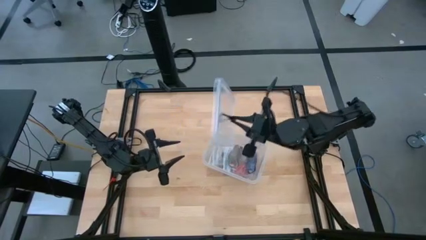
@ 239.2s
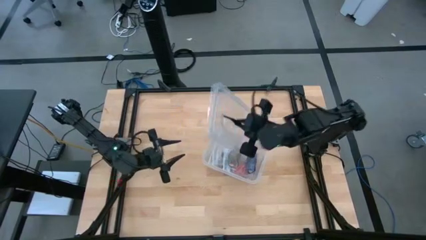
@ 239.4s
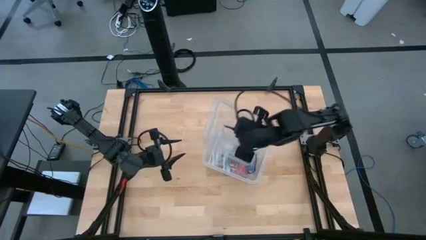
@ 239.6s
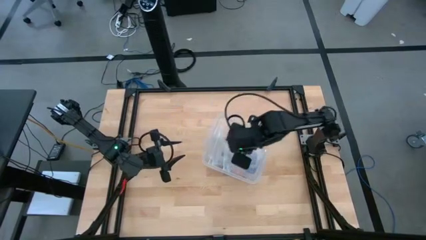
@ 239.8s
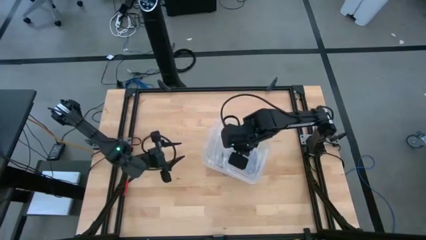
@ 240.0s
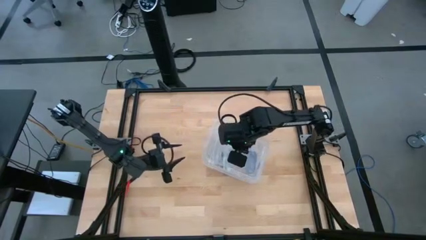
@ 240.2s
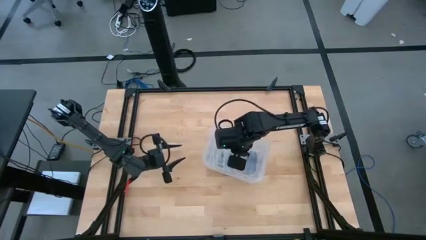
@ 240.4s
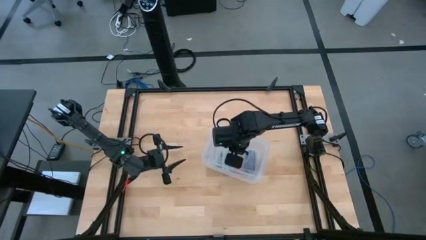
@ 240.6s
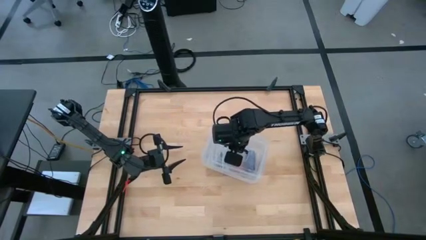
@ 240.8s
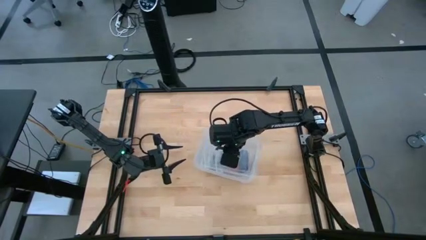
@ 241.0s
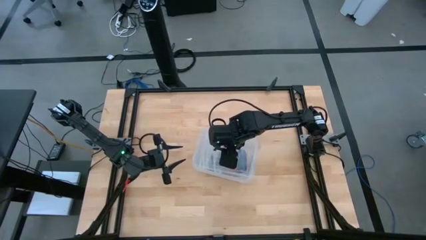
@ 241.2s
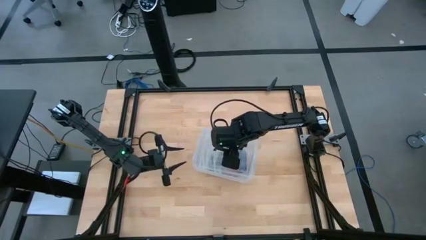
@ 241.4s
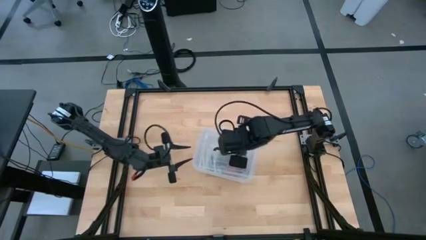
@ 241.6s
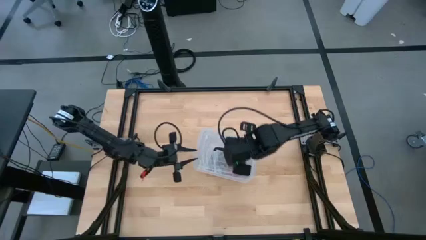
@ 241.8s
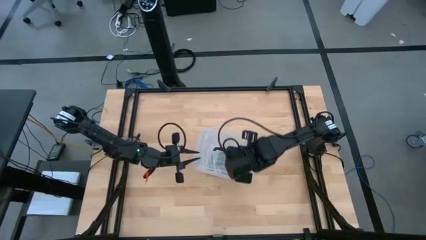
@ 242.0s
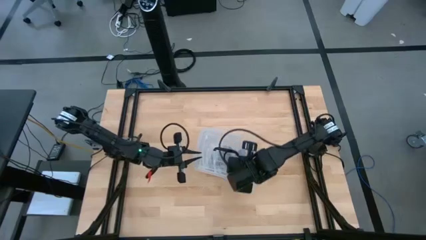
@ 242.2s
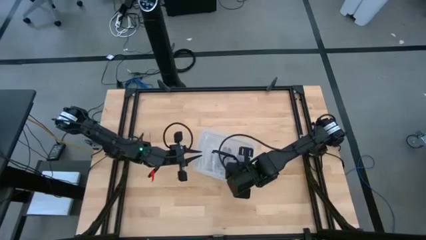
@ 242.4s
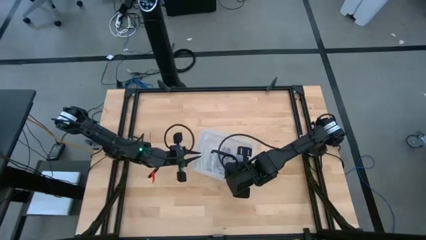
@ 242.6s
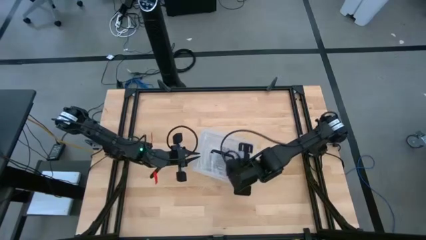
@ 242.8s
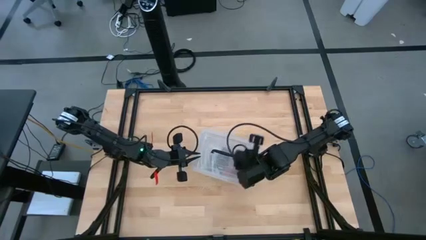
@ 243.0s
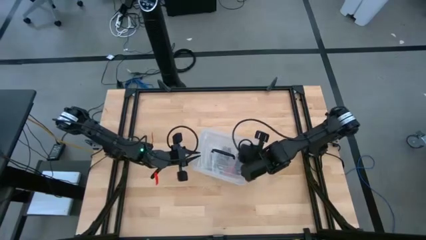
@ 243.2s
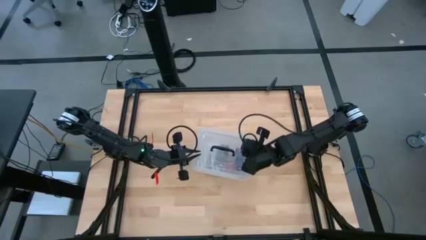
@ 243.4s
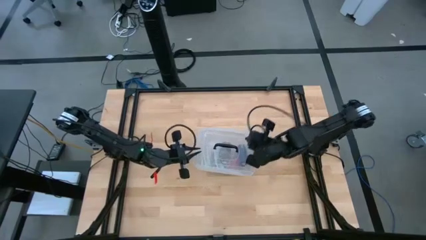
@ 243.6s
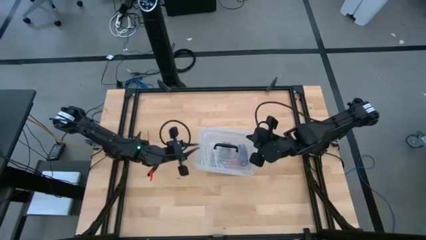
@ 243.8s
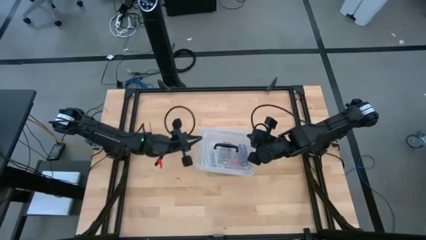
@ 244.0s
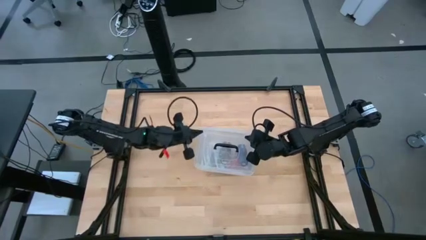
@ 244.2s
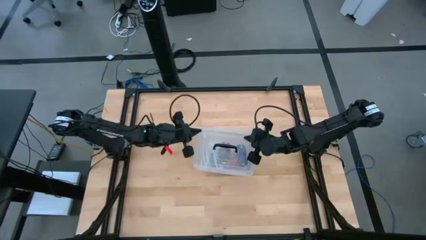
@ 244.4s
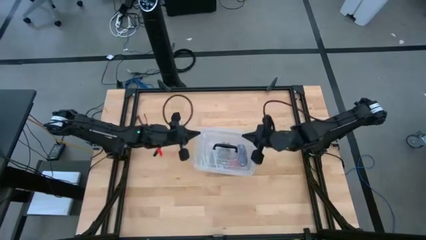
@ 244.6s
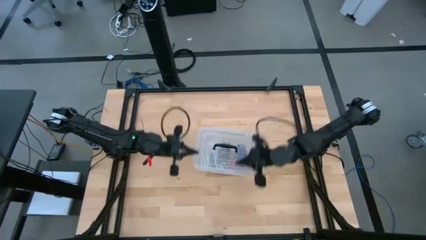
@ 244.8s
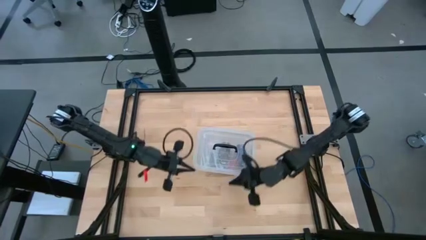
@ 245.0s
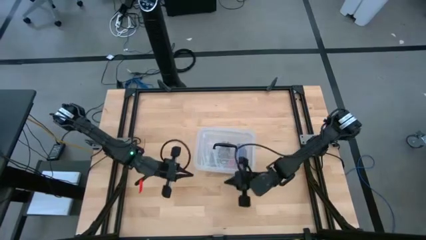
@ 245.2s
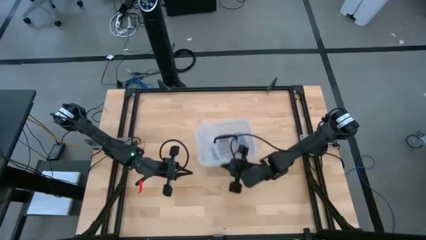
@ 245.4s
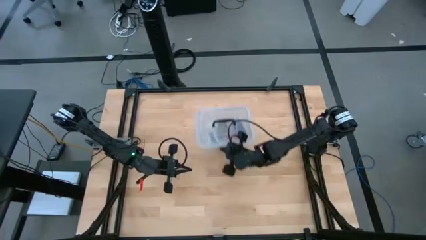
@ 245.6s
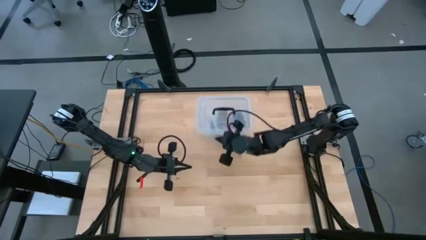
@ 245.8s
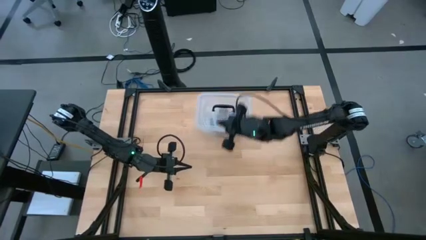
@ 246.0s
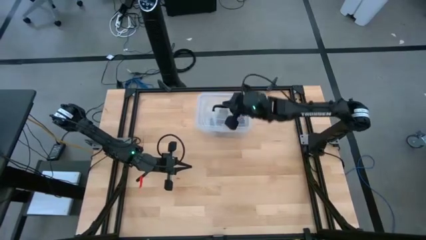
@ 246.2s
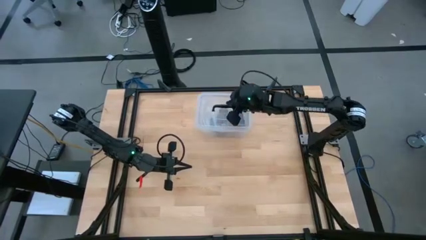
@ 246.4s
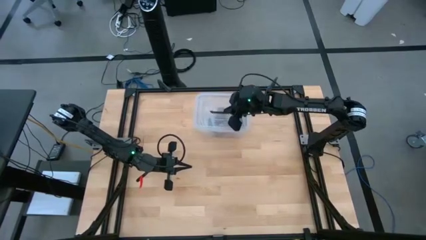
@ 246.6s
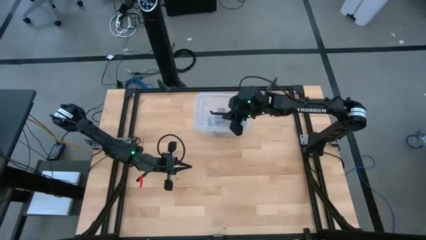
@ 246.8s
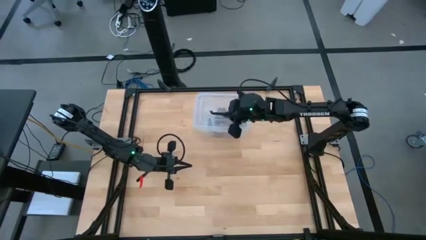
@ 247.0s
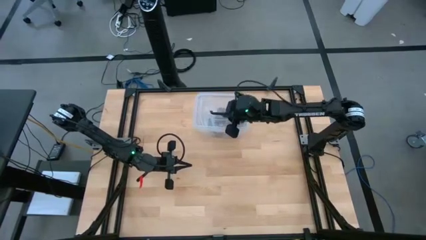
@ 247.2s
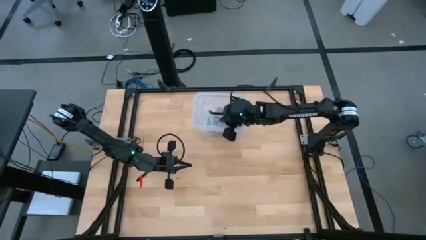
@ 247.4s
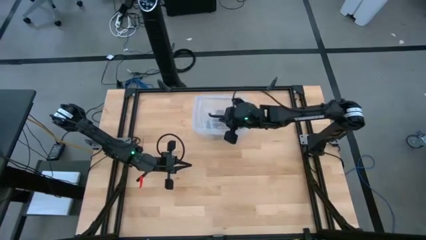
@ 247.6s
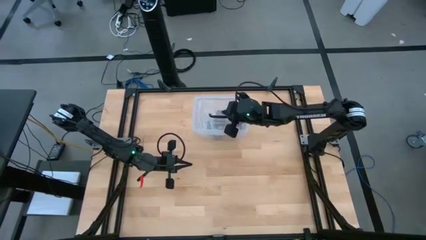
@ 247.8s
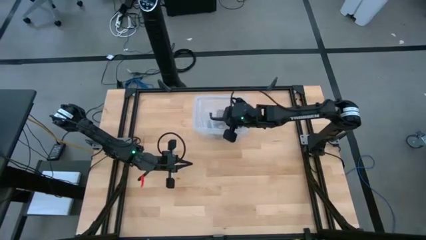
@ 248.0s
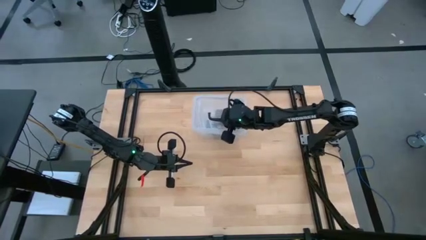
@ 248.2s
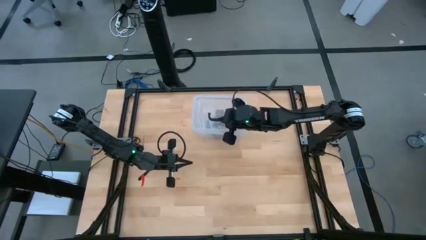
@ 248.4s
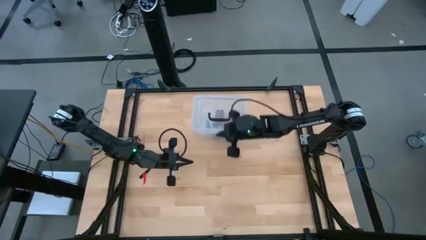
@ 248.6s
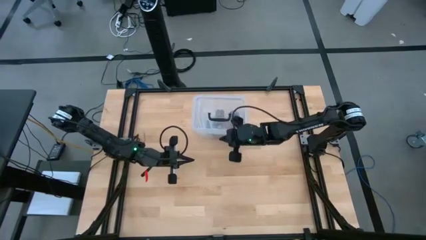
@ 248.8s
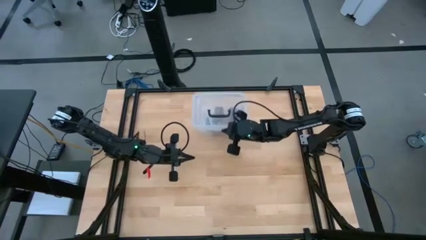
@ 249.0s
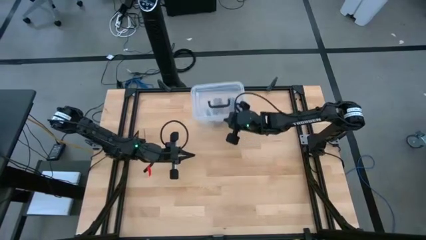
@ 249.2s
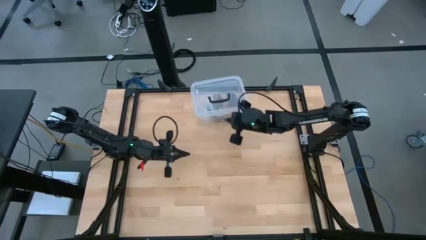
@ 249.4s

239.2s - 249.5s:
Task: Roll bandage
Close the transparent bin with the transparent bin lid

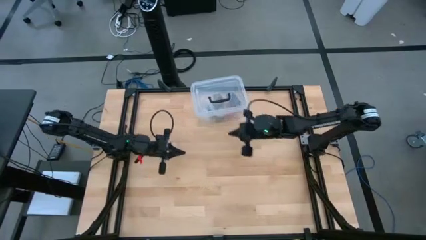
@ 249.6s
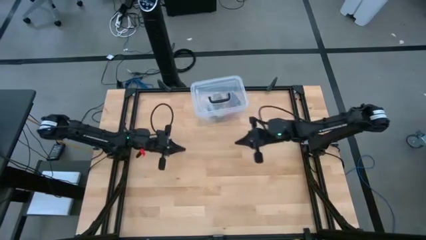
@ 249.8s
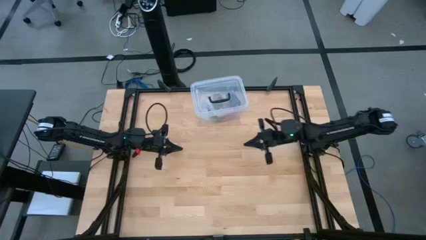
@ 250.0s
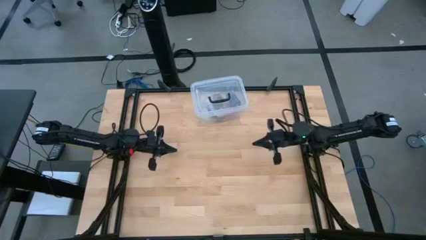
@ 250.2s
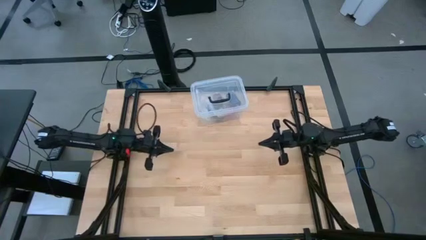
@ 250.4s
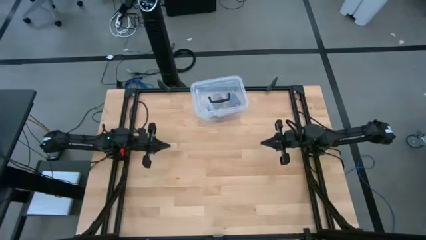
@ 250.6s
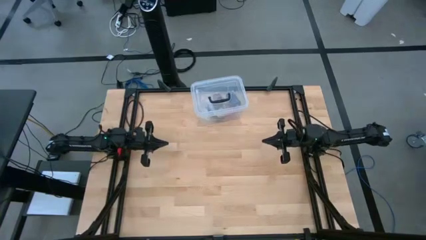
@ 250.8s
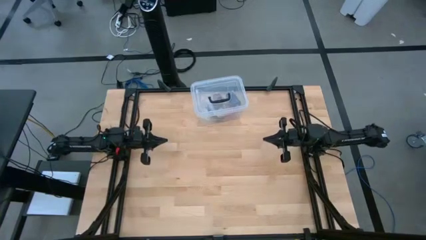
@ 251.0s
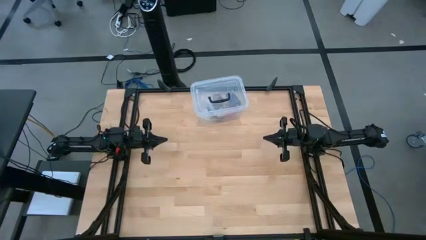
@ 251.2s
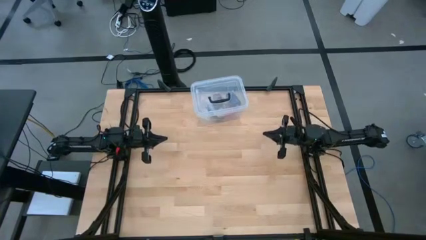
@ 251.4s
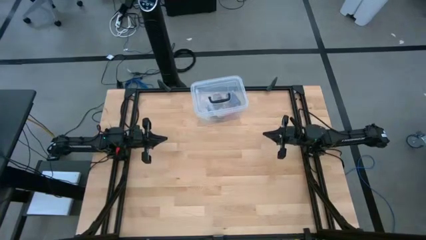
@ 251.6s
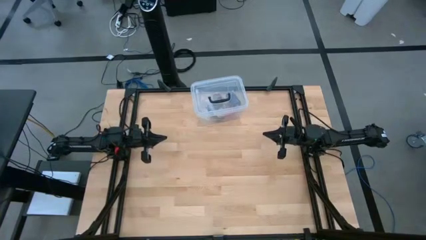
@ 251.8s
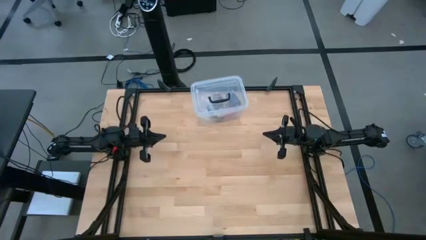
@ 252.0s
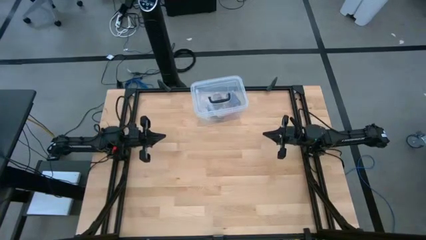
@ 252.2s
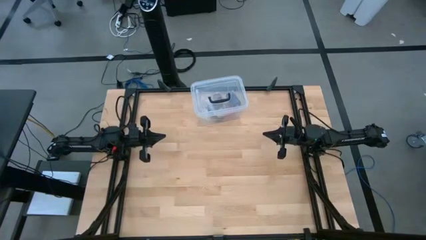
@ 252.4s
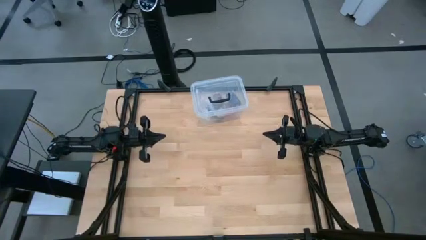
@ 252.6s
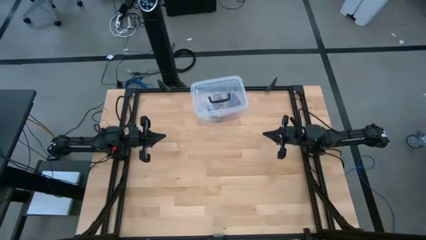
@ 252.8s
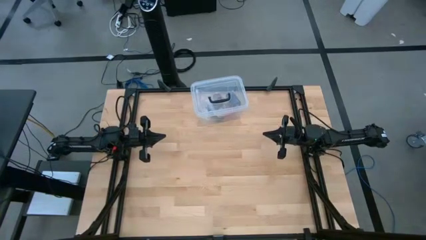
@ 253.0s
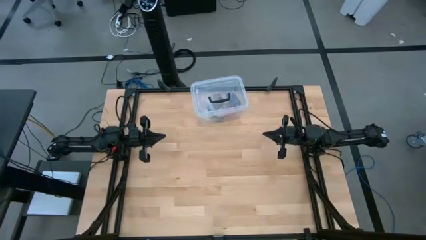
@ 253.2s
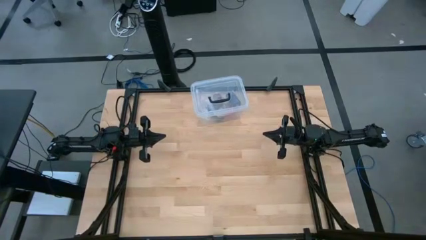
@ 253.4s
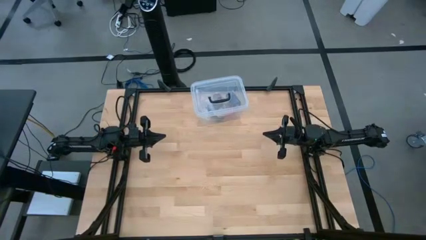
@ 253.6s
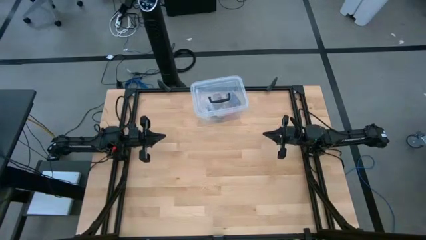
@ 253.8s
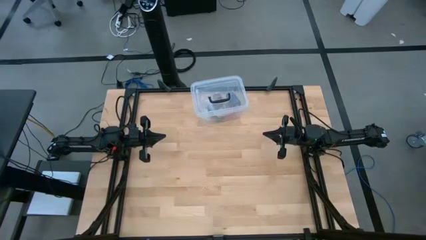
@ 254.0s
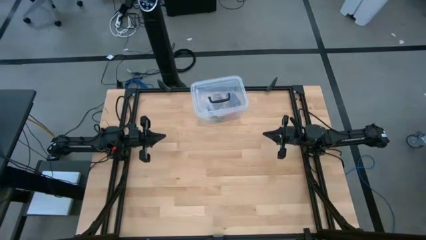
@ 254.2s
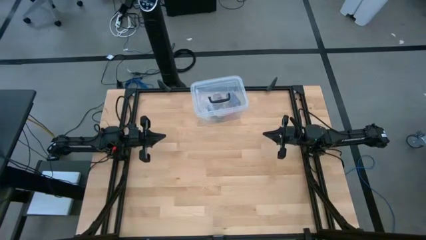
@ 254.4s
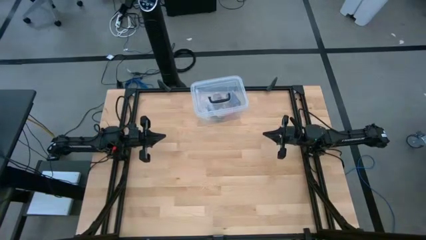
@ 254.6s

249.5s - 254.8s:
Return to Home Position

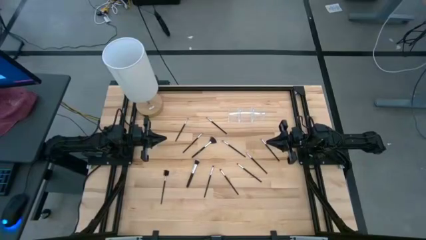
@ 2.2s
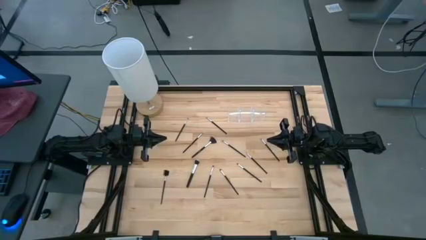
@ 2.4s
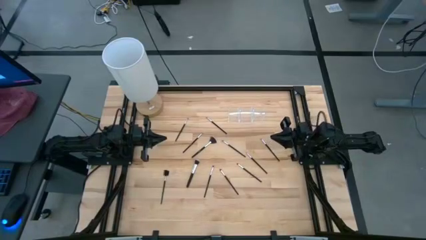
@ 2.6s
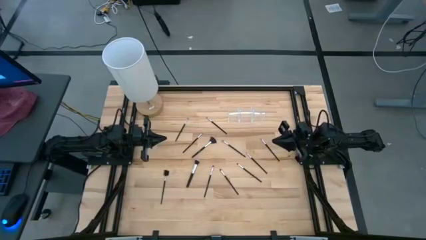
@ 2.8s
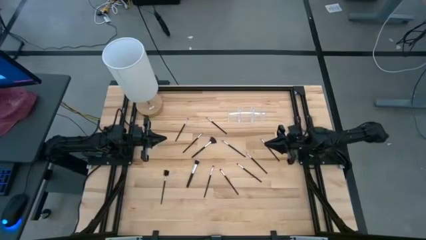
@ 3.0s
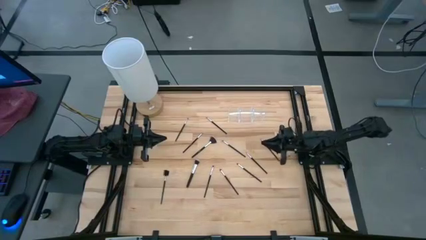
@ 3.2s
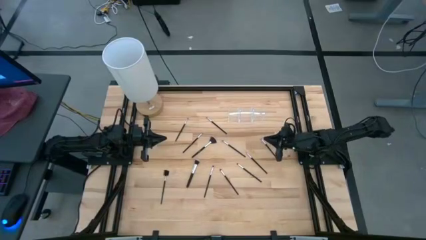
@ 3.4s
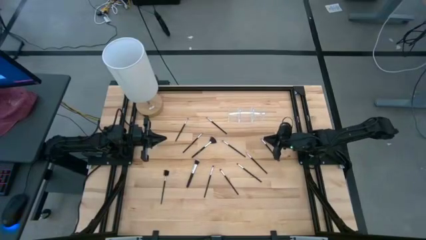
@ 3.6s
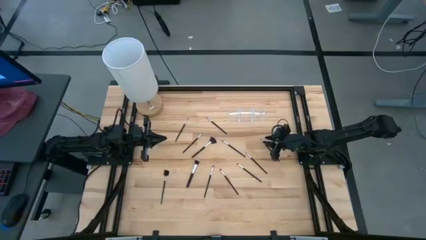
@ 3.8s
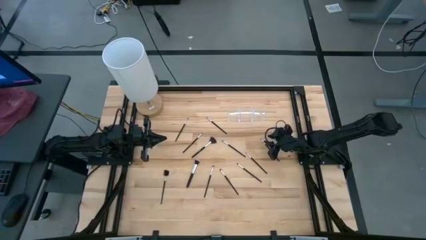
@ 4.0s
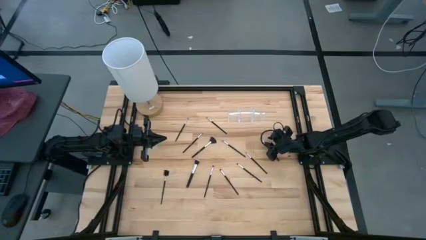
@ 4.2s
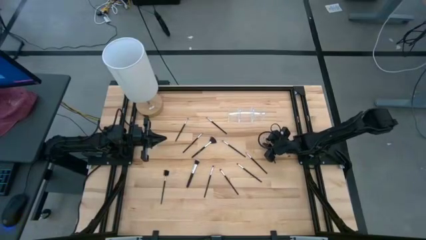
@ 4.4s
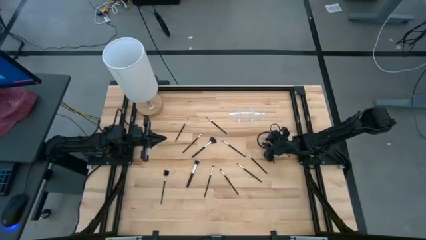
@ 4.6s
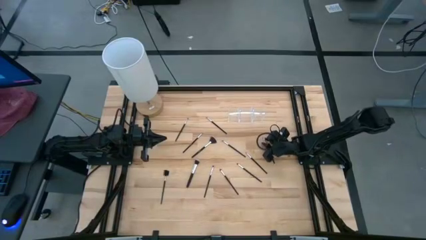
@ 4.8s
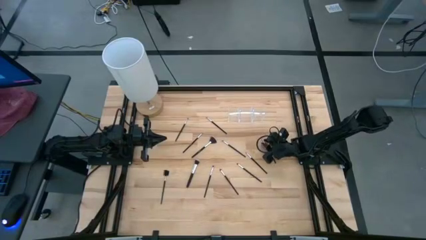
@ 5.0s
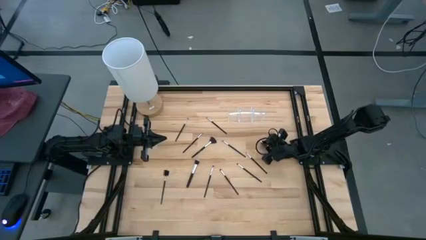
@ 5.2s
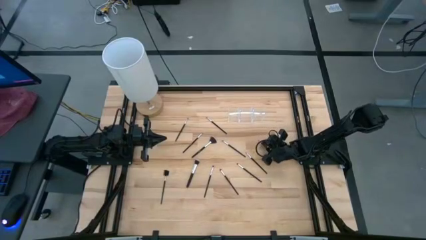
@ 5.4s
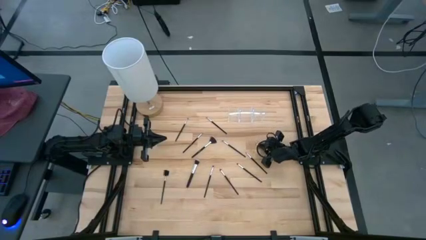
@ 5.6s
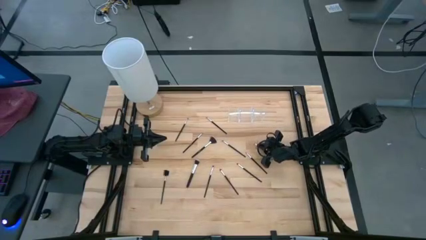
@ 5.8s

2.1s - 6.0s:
Task: Put items in baskets/containers
Put the black eyeshadow brush into the transparent organizer
